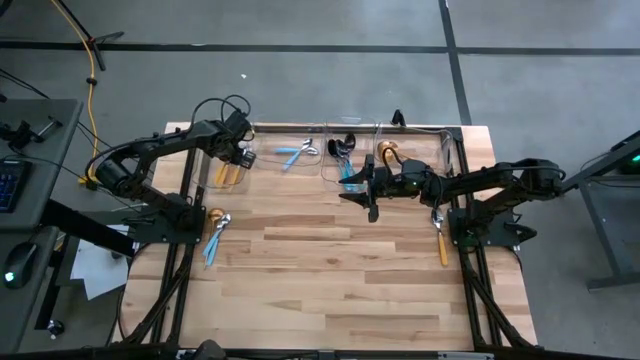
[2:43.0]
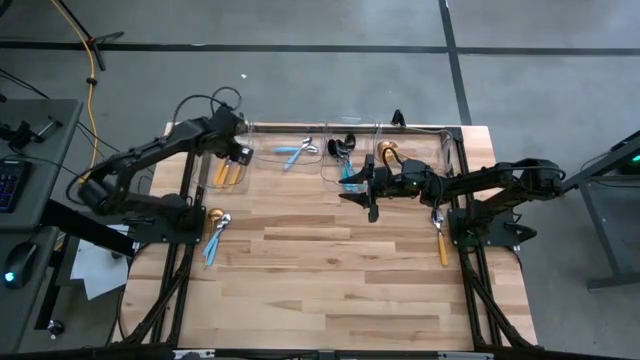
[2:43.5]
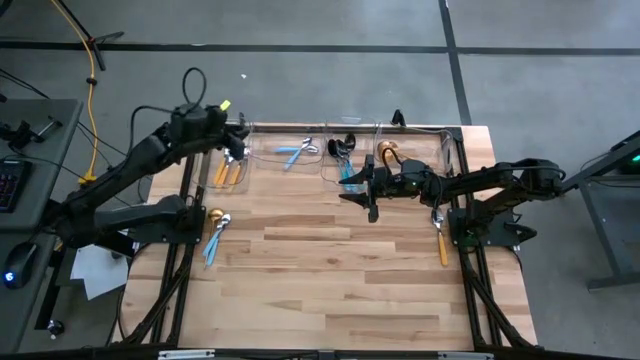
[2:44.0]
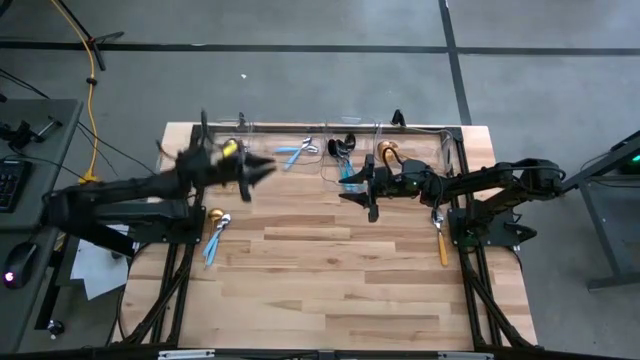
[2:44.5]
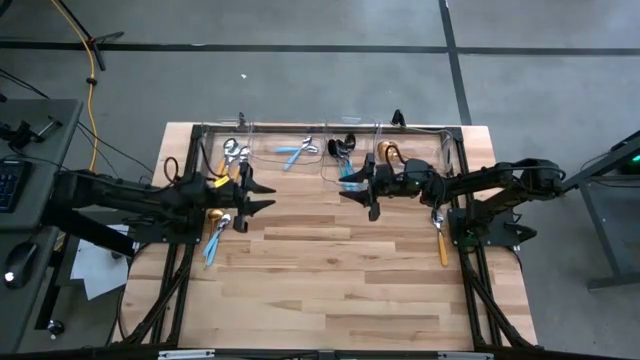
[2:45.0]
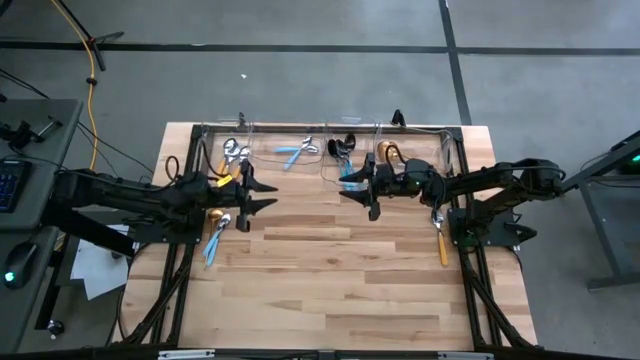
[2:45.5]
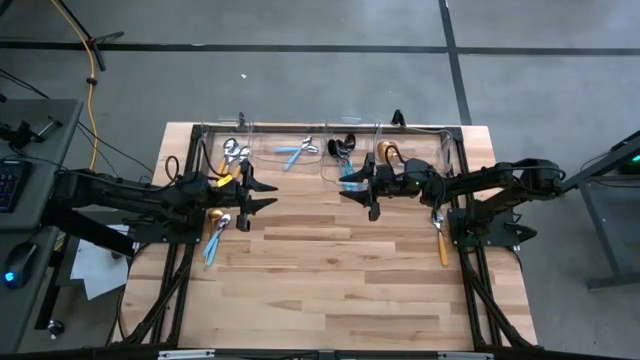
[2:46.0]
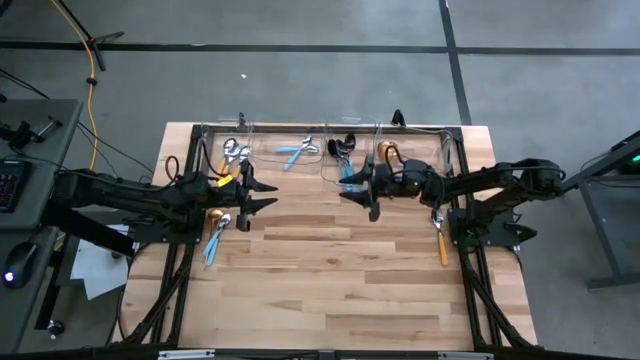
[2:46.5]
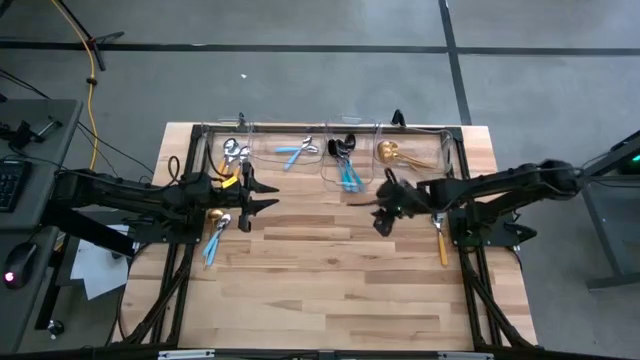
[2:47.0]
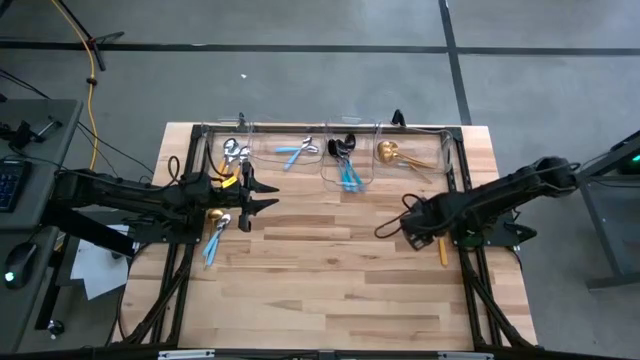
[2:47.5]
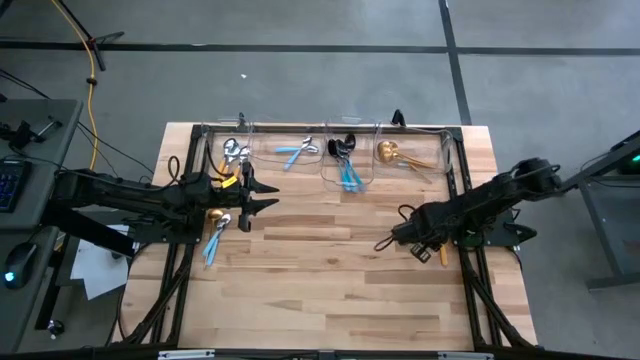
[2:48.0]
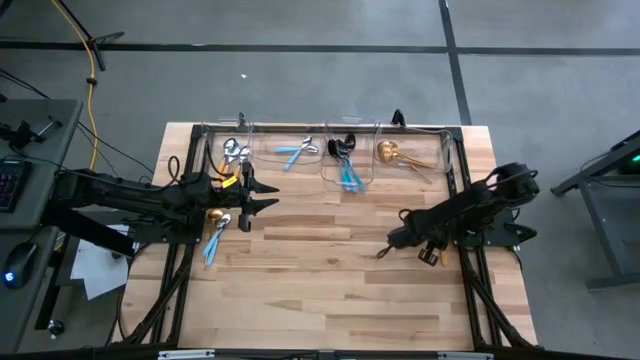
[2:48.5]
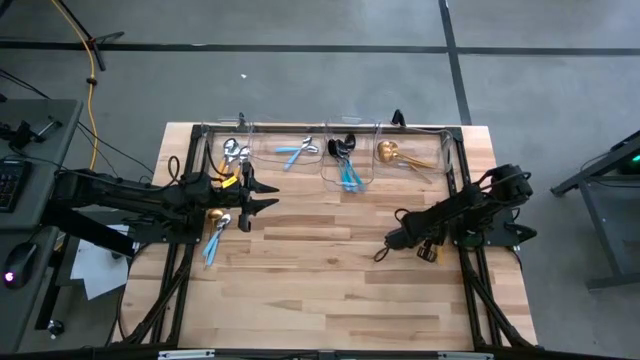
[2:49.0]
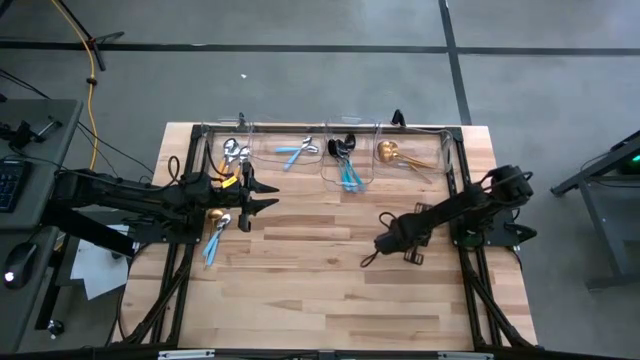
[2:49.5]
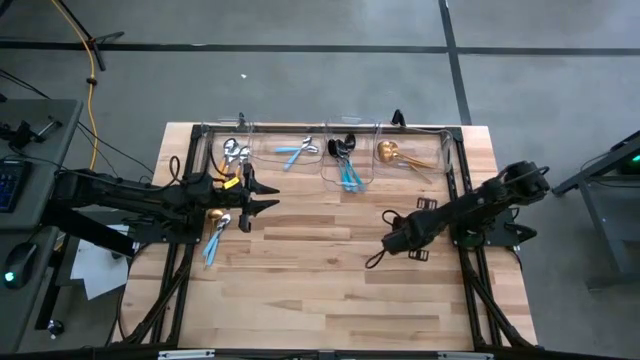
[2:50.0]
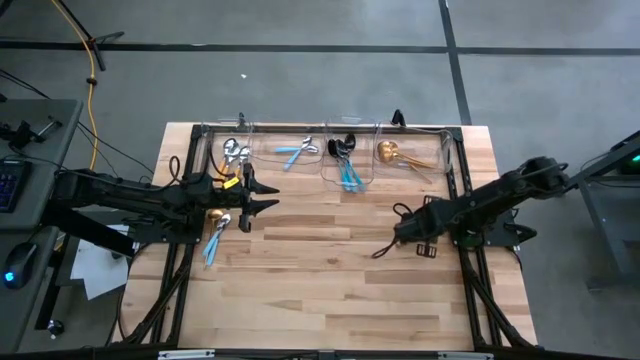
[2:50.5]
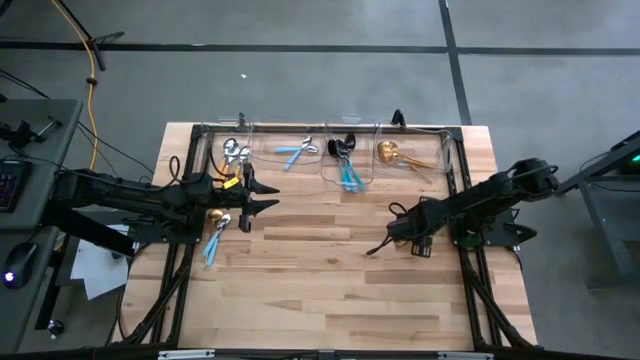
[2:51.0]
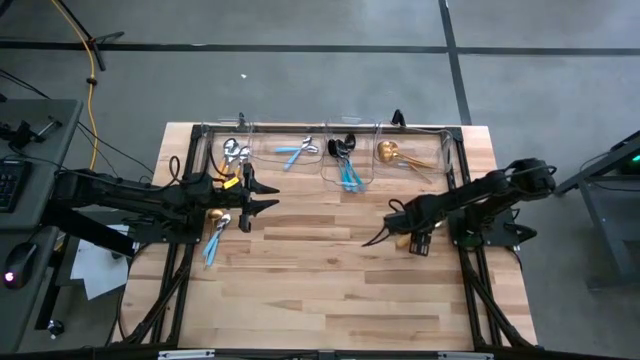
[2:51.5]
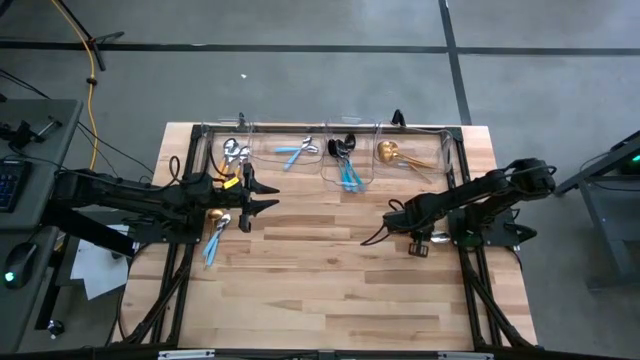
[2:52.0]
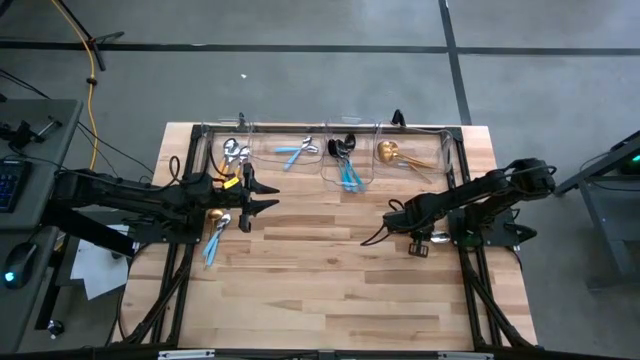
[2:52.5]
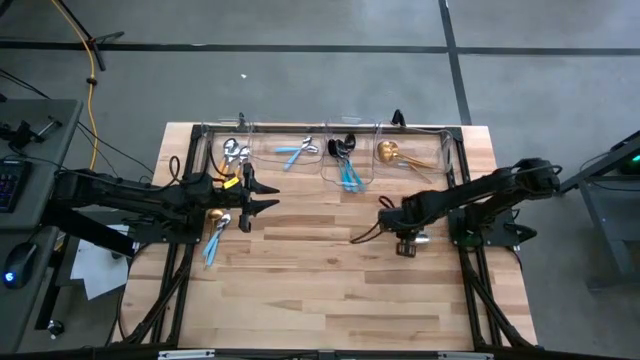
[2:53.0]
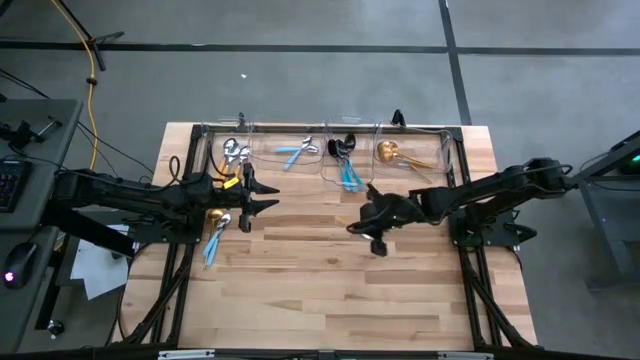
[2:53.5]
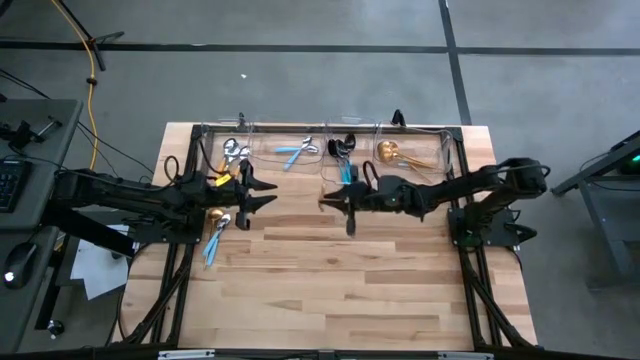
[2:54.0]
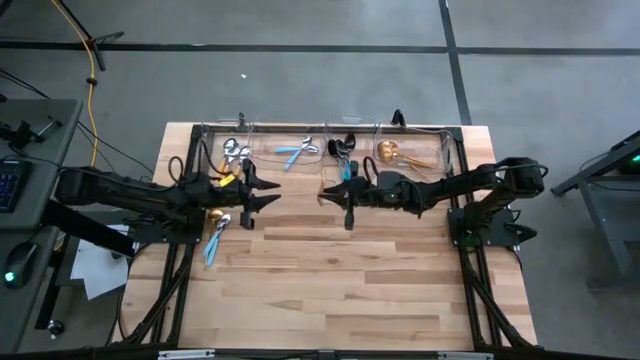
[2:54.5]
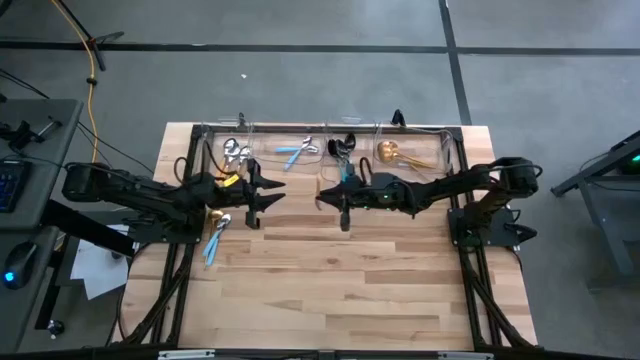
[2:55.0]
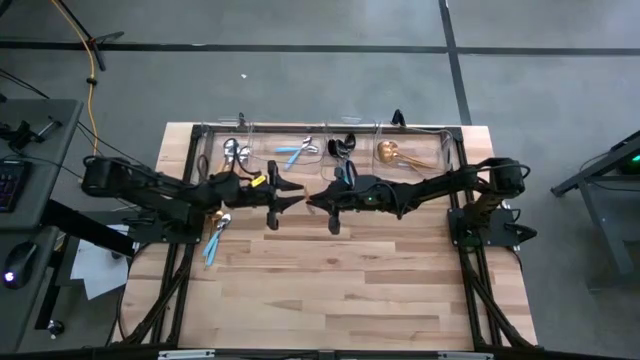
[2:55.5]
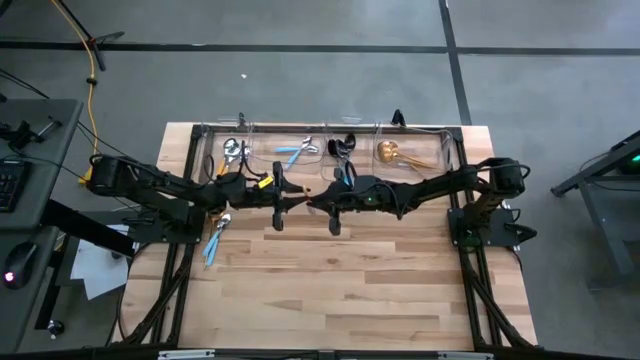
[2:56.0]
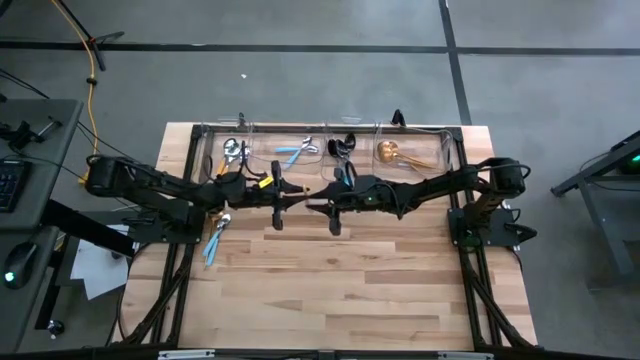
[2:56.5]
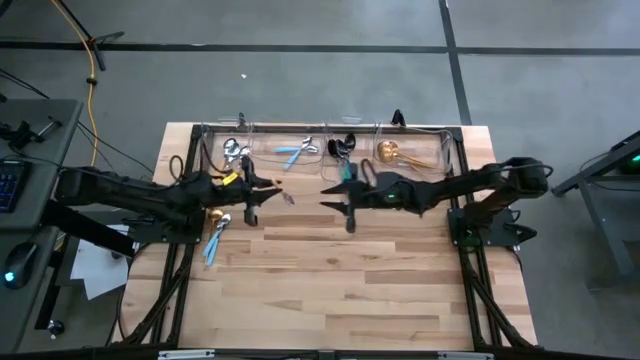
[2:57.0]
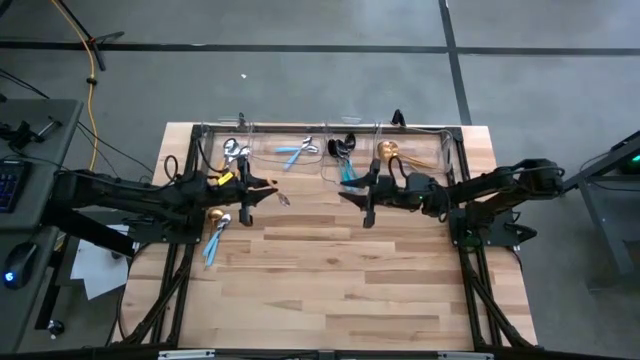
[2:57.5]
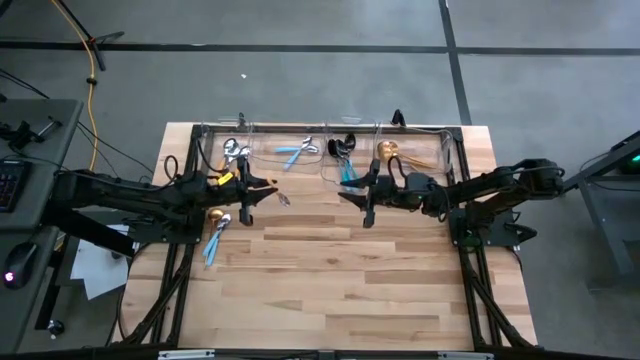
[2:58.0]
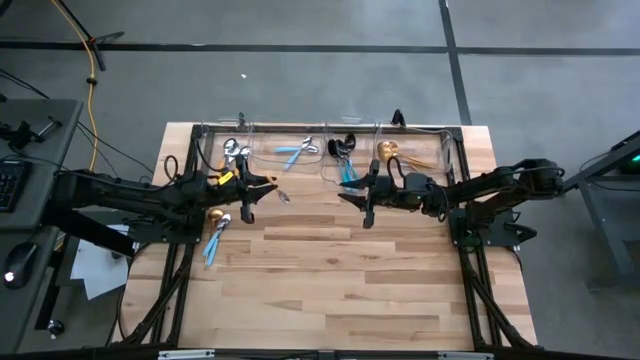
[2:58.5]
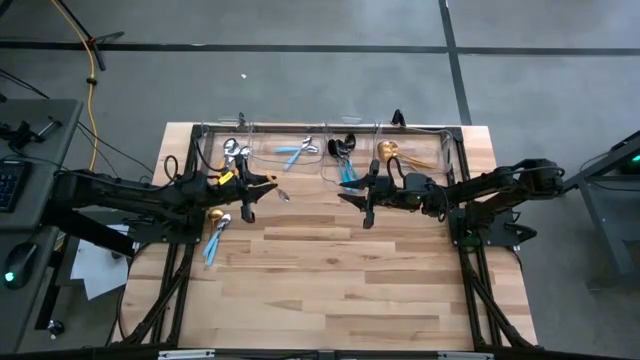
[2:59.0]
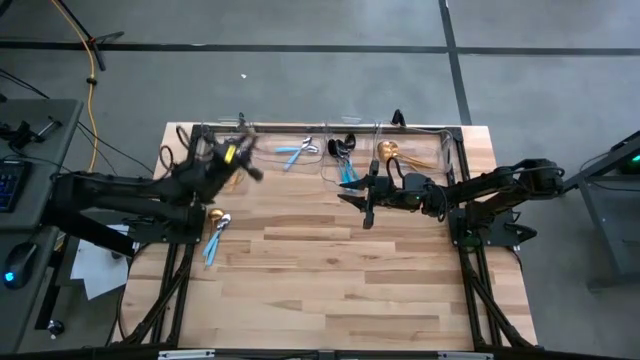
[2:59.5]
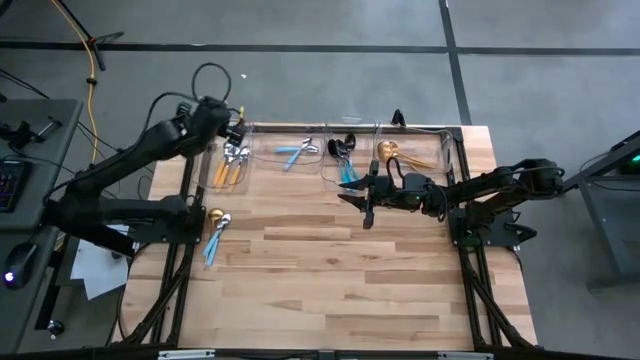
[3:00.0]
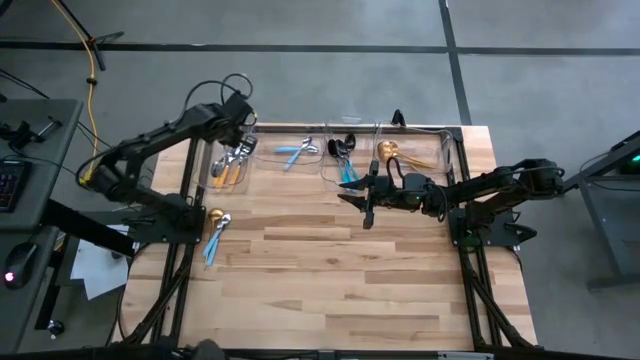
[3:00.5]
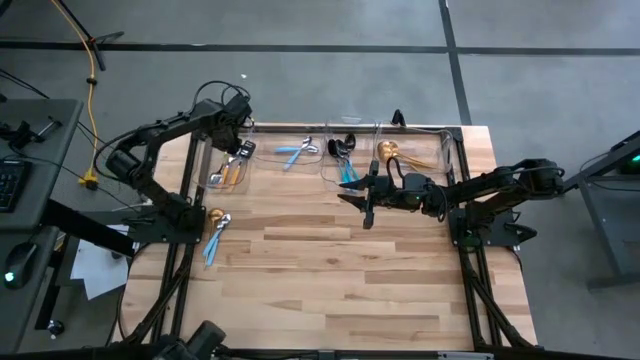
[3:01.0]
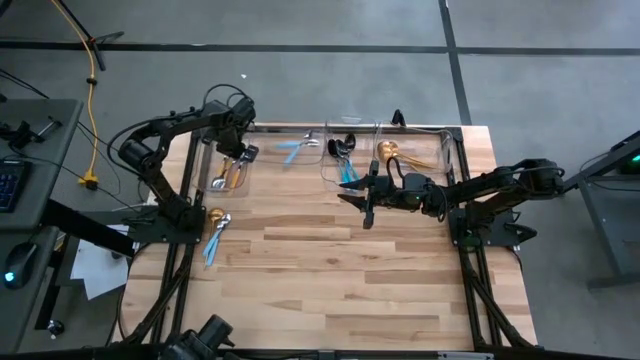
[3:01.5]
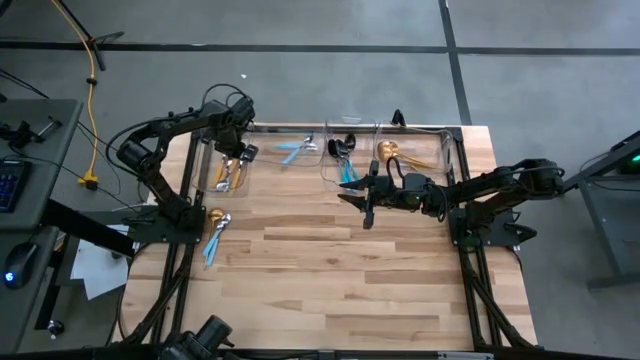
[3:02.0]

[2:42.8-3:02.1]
Task: Sort silverware by color (type)
Put the yellow spoon into the left transparent bin

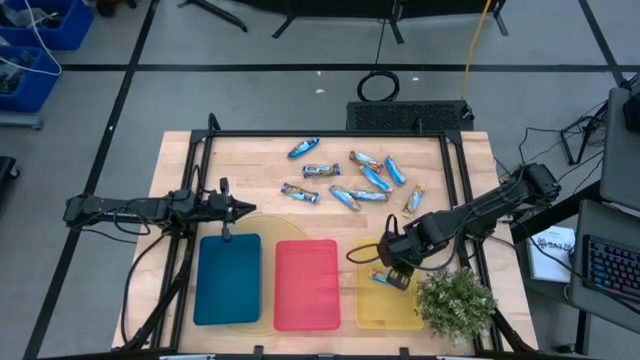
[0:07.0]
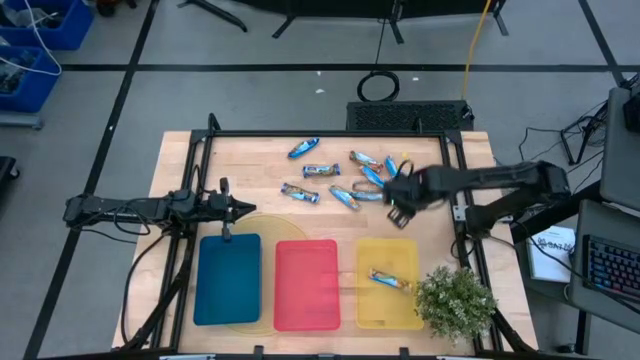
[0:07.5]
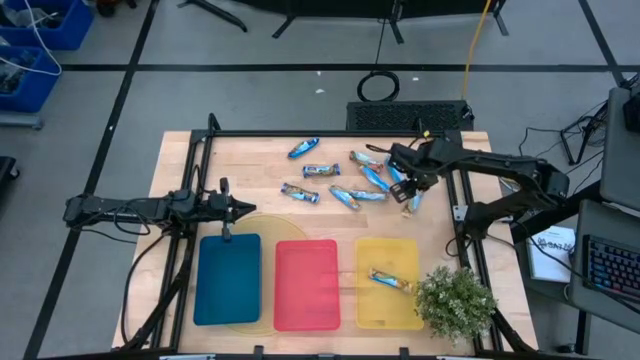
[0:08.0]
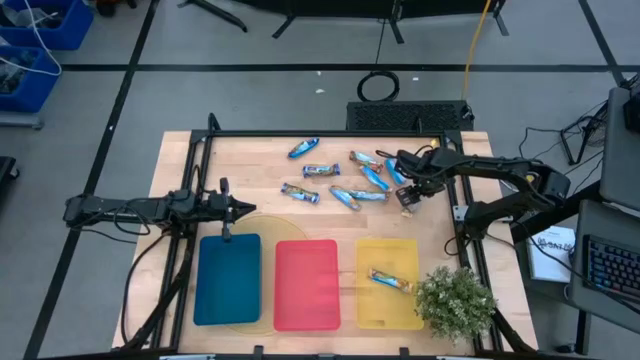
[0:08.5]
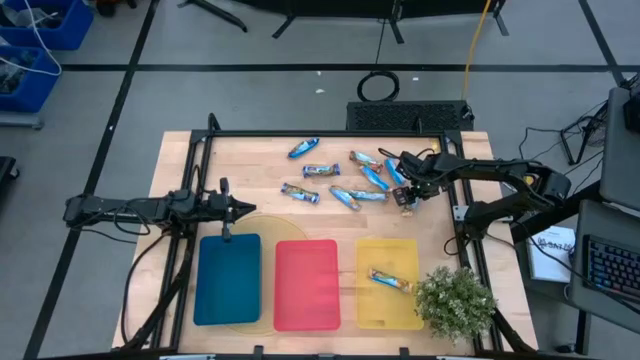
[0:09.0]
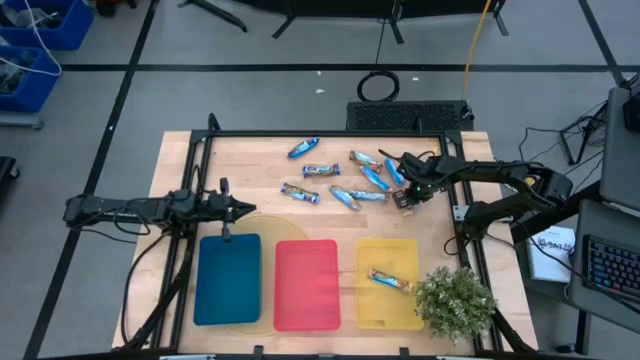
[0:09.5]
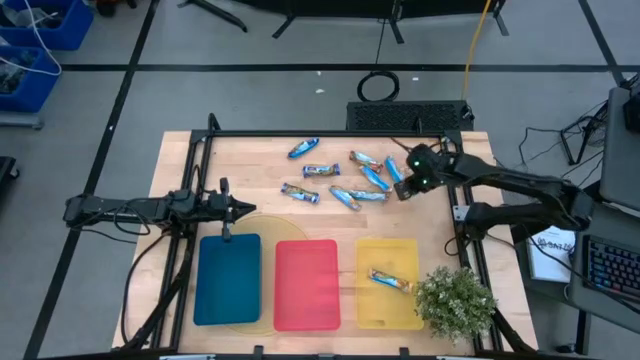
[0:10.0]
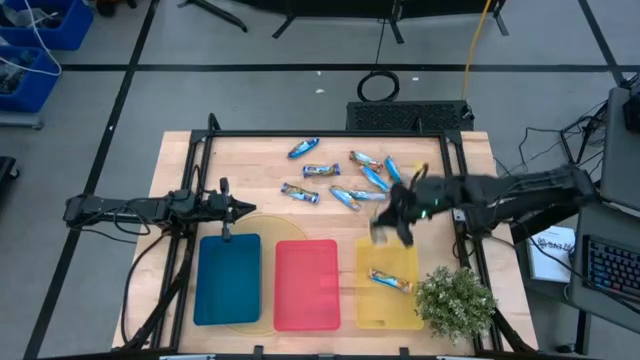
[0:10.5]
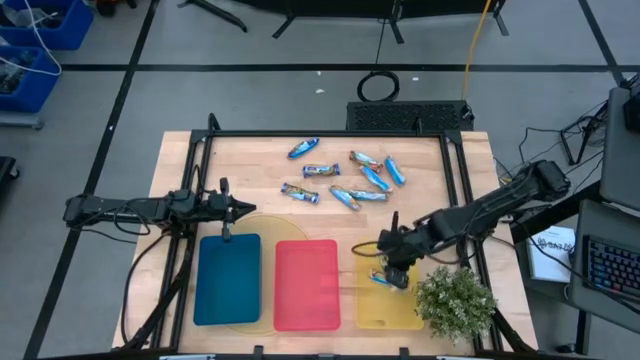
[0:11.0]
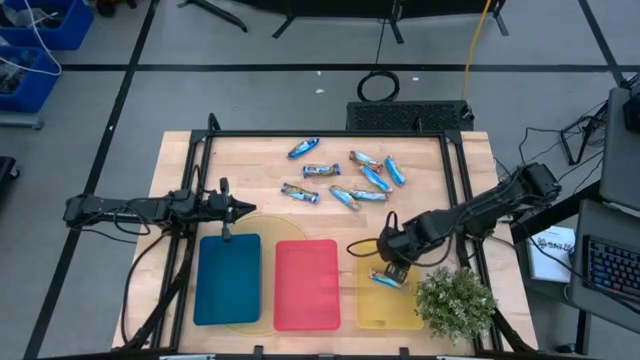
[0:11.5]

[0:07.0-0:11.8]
Task: Pick and place Granola Bars by type
Put the bottom right yellow granola bar into the yellow bin
